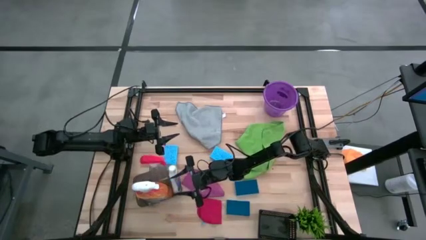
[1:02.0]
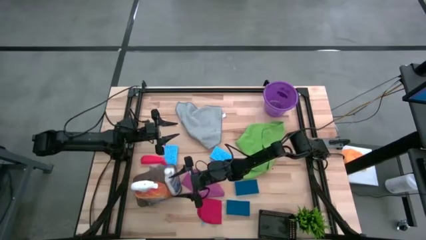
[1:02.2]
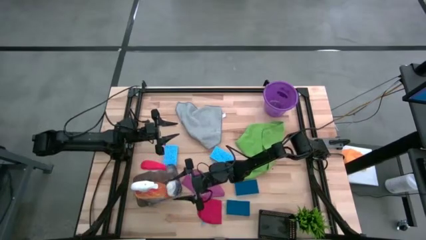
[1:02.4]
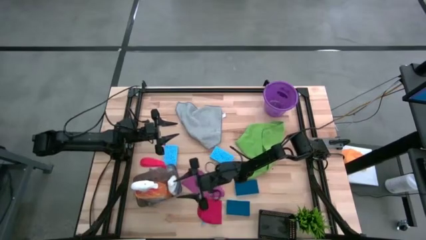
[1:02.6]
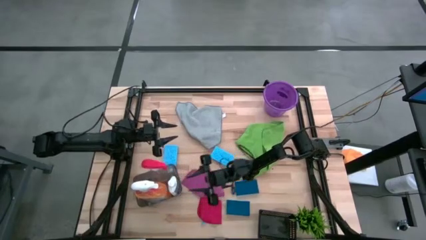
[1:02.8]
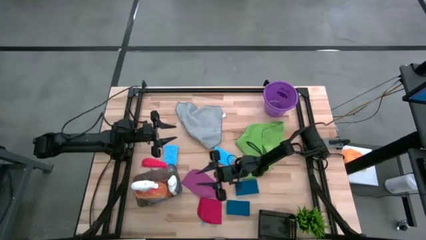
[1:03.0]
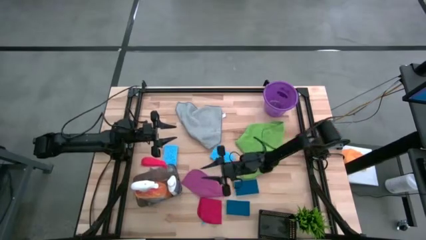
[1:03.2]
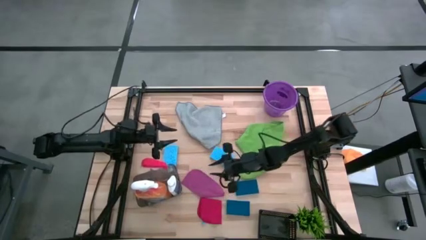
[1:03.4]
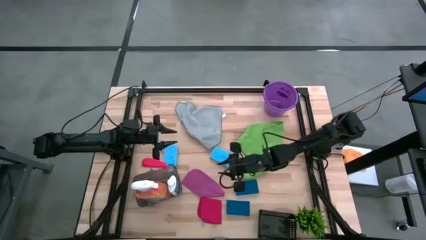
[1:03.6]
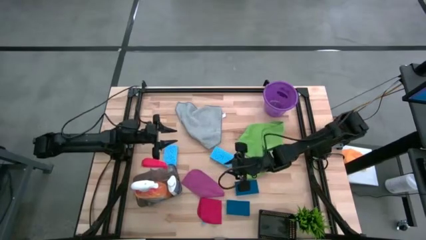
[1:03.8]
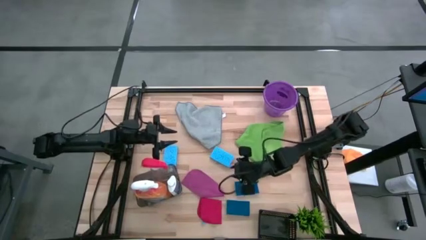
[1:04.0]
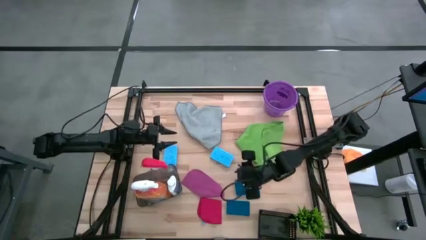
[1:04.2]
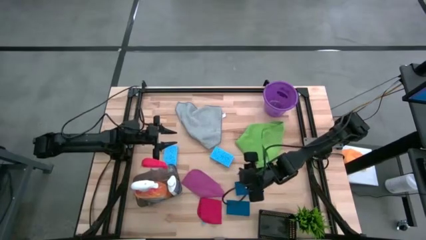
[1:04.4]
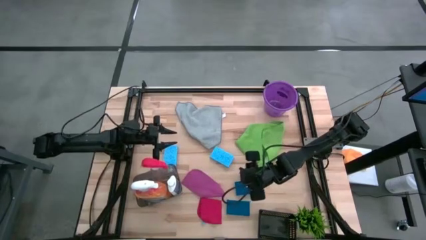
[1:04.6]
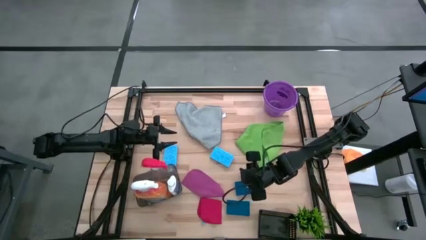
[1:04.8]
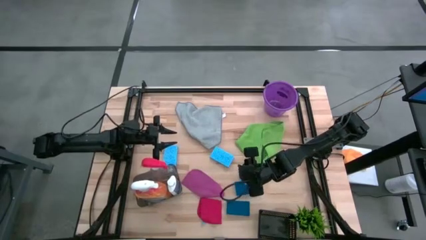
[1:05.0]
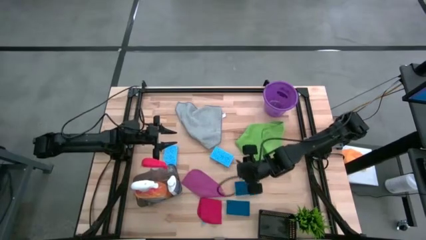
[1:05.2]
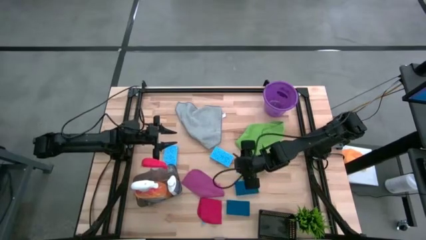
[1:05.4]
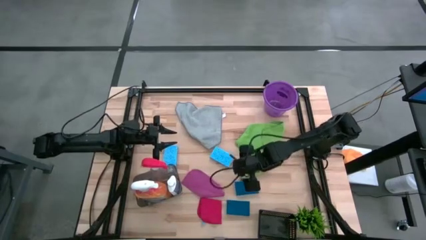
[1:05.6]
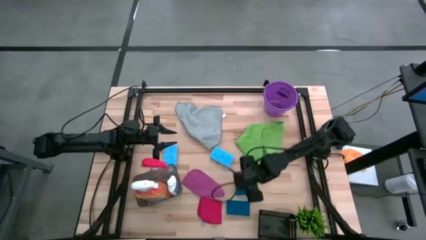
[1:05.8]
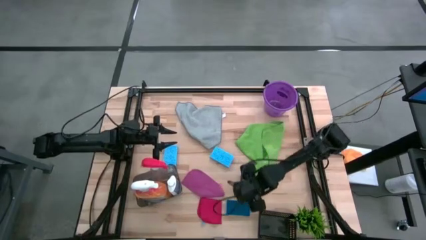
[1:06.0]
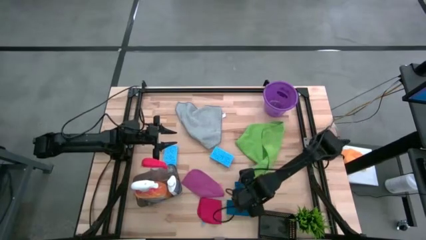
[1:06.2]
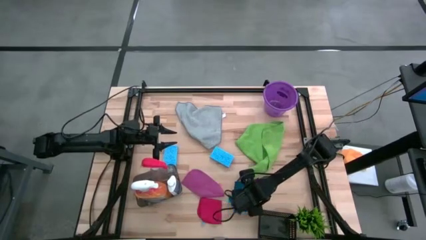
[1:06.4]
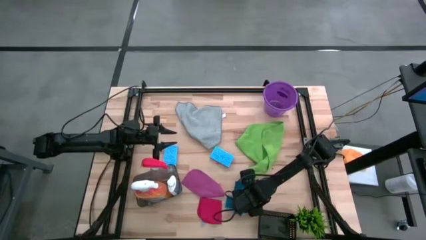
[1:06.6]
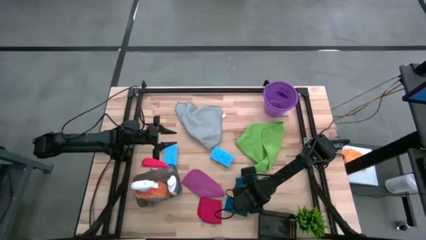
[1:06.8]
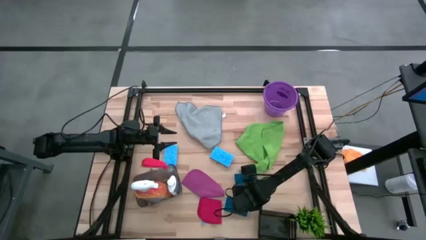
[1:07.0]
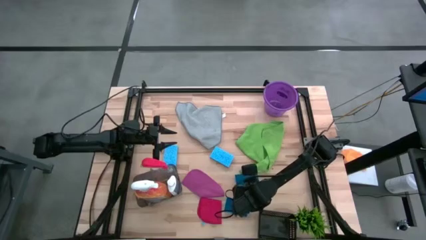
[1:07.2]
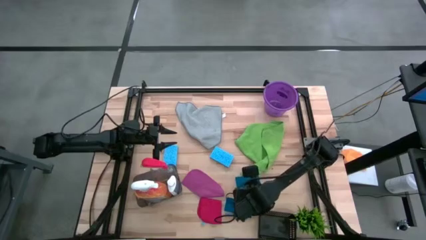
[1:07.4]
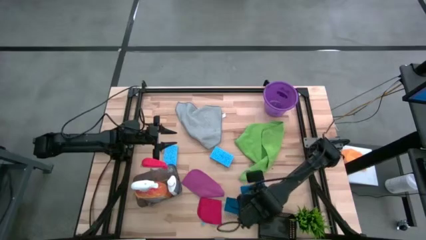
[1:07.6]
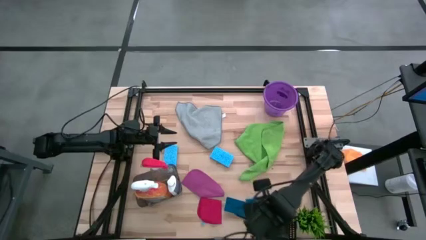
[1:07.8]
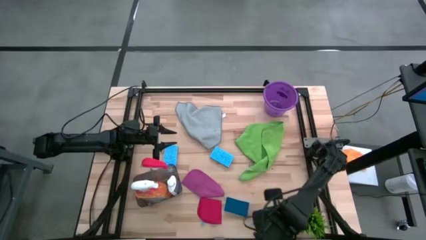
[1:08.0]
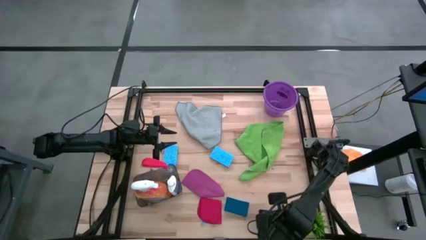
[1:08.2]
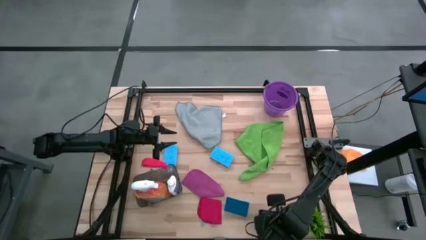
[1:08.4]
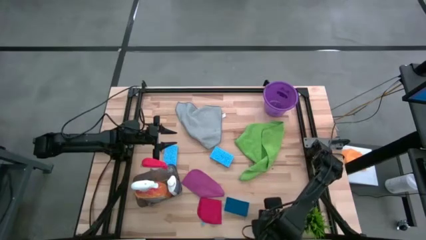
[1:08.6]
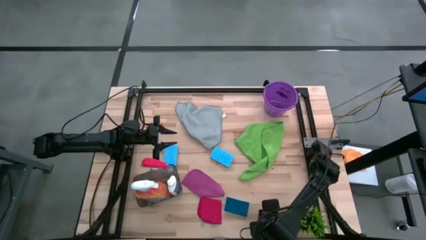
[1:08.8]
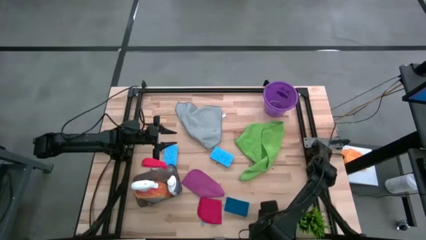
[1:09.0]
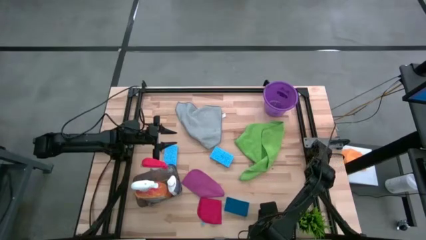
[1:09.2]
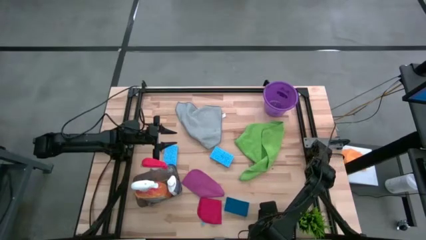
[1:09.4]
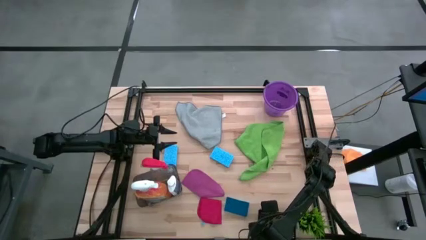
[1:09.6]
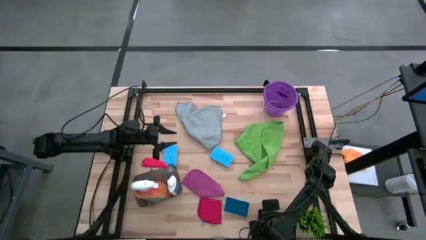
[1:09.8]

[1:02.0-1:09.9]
Task: Pick & Place Kitchen Items
Put the top blue sponge into the black bin

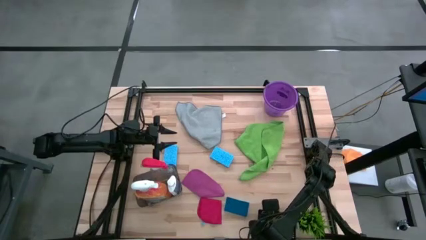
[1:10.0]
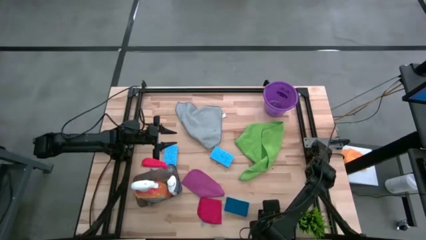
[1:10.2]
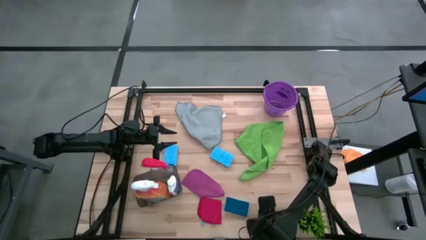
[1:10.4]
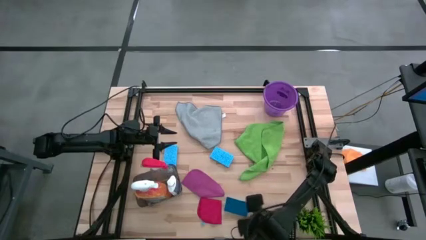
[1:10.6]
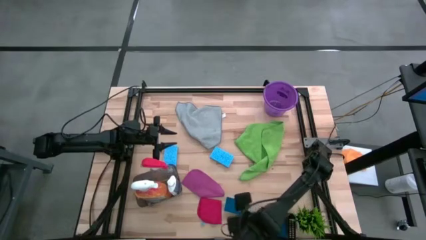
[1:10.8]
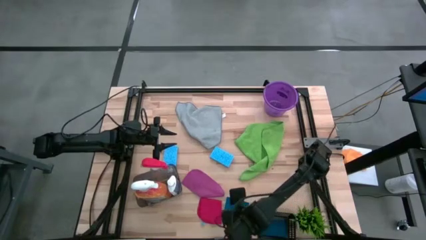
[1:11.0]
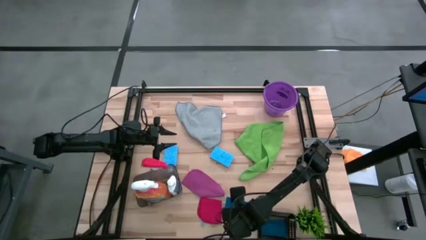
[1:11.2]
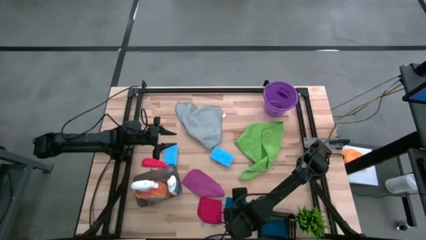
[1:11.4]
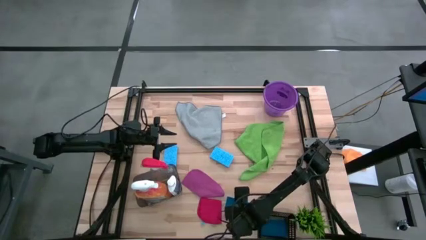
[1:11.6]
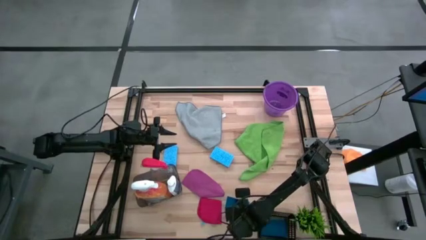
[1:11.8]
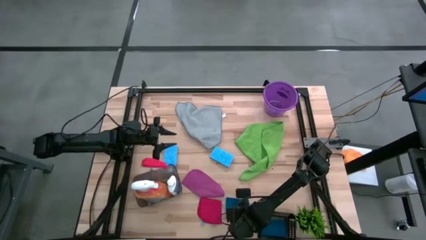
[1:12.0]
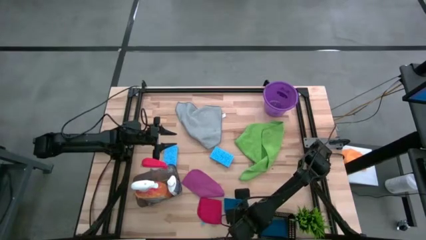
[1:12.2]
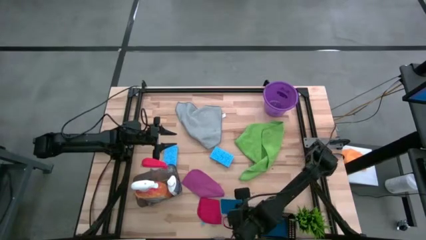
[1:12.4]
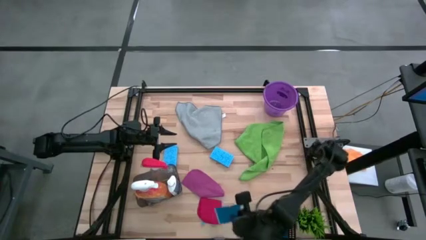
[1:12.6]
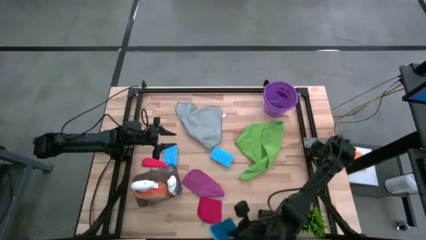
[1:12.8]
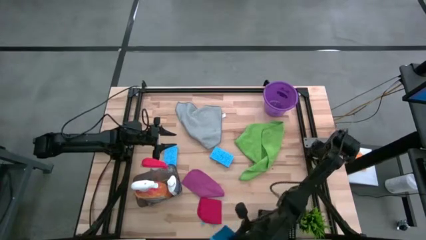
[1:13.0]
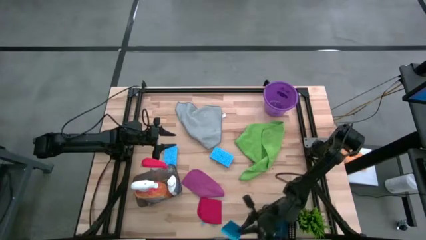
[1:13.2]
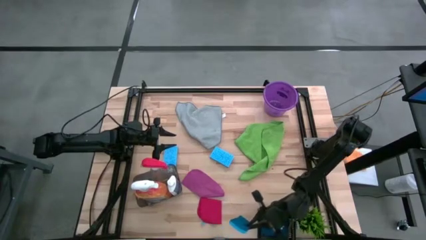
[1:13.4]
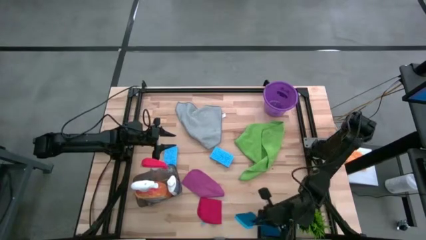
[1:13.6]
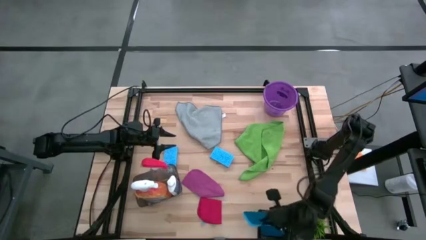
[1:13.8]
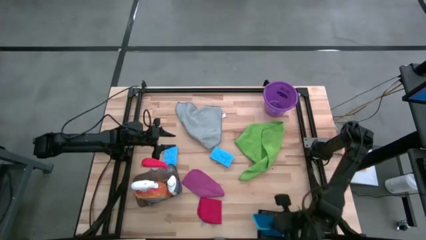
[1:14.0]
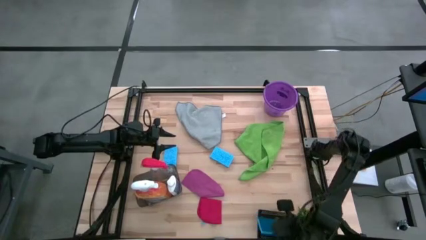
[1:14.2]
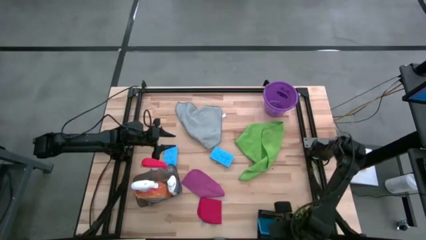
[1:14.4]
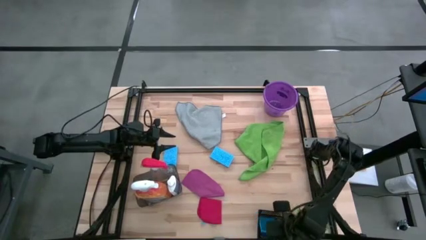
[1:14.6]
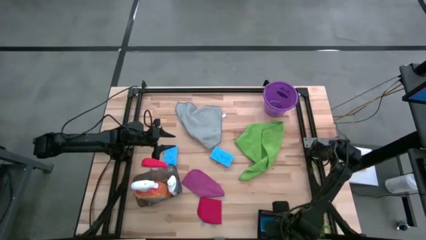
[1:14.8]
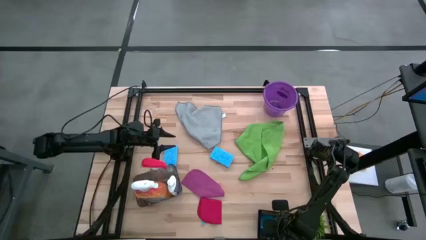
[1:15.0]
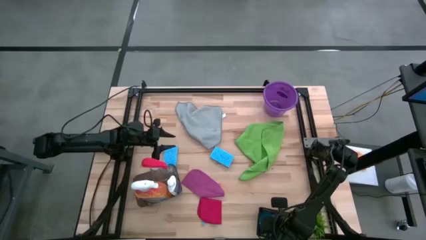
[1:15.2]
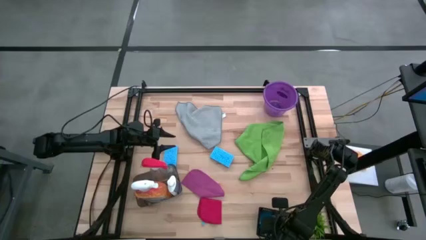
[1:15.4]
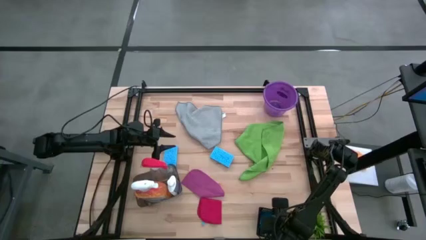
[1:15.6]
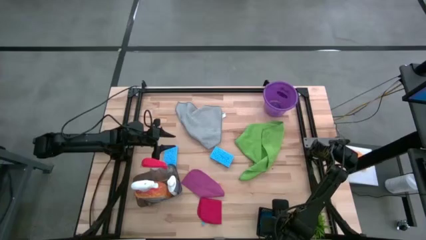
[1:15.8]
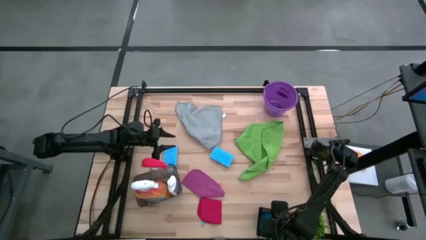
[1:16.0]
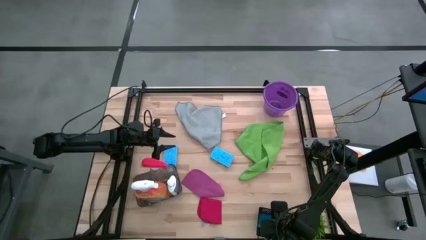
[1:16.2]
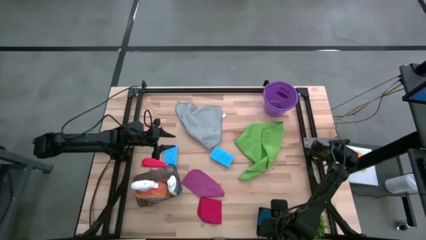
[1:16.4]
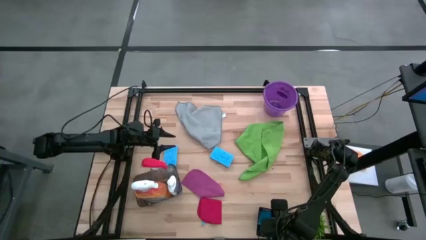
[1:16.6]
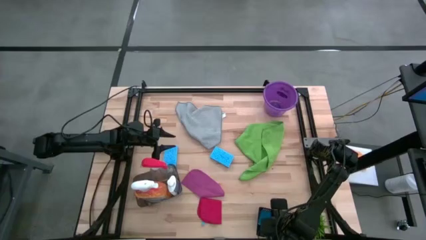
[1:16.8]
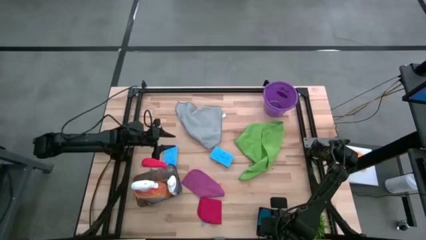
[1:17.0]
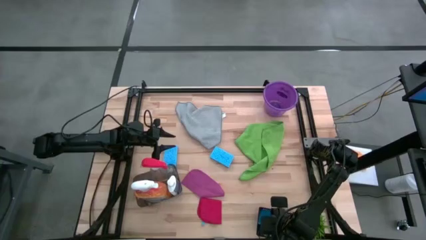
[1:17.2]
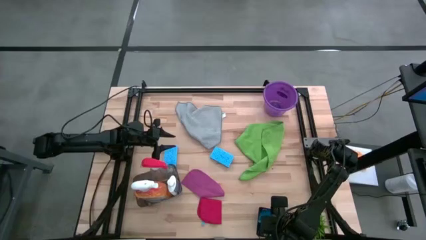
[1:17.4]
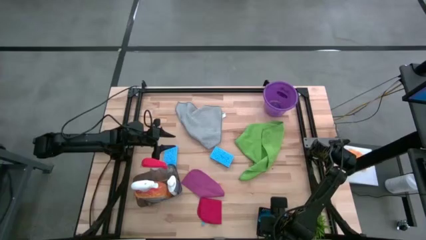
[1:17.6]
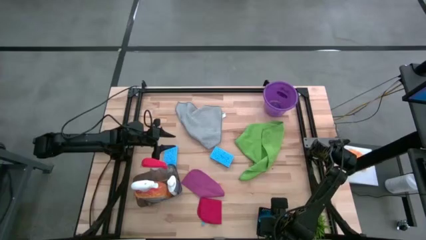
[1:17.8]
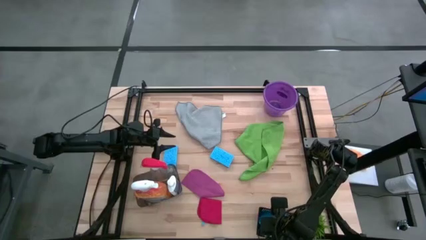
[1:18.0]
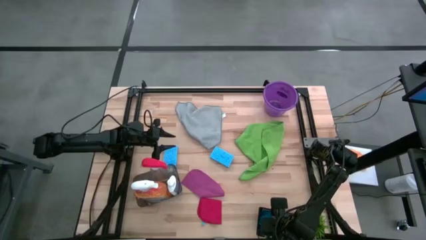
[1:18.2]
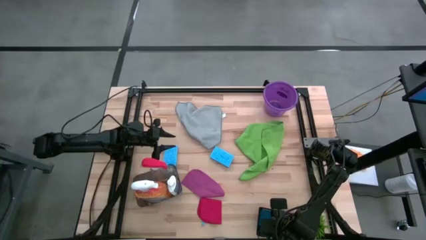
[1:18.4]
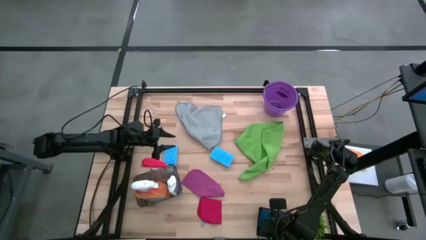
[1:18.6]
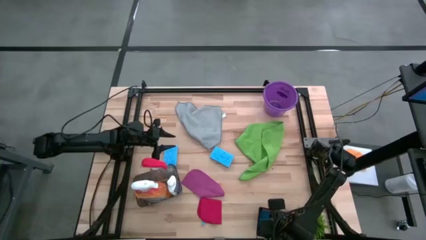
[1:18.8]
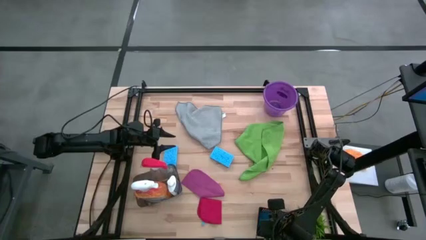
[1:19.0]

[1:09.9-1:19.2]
Put the blue sponge into the black bin
